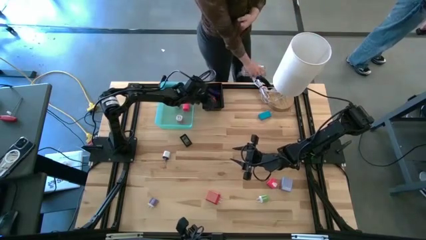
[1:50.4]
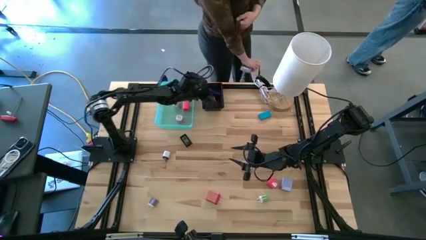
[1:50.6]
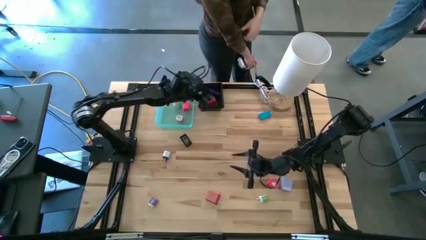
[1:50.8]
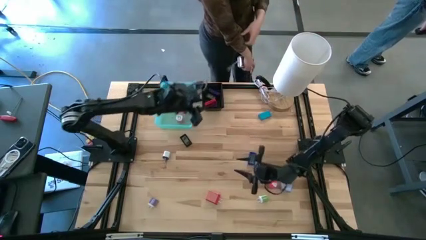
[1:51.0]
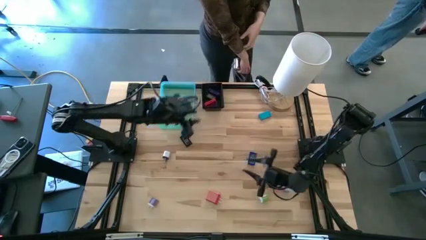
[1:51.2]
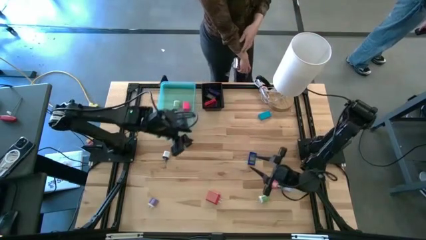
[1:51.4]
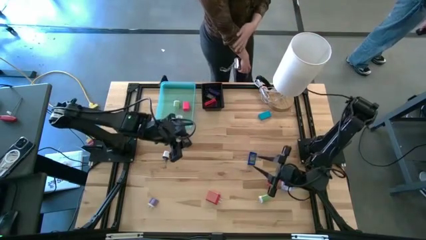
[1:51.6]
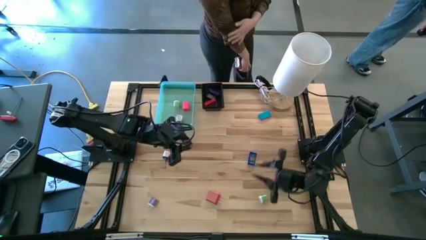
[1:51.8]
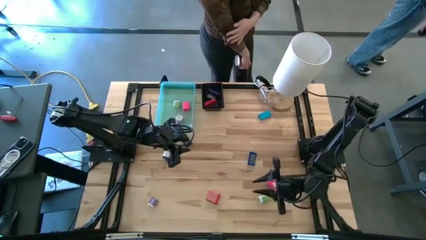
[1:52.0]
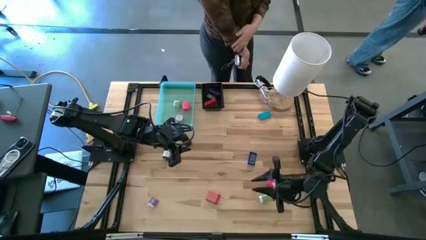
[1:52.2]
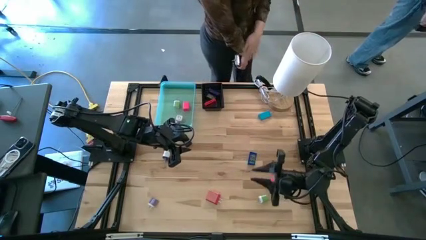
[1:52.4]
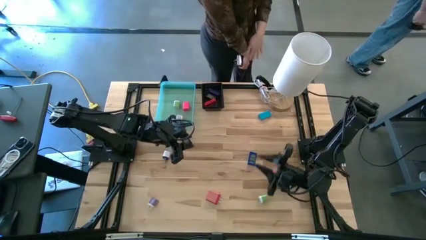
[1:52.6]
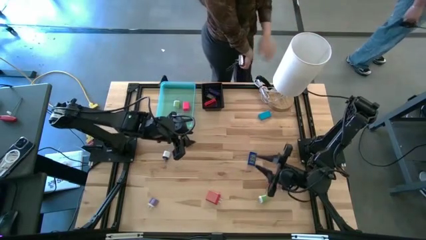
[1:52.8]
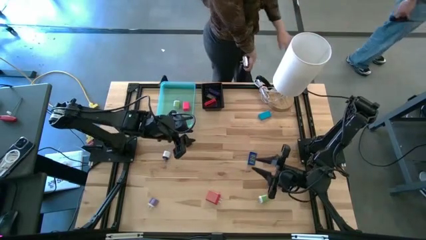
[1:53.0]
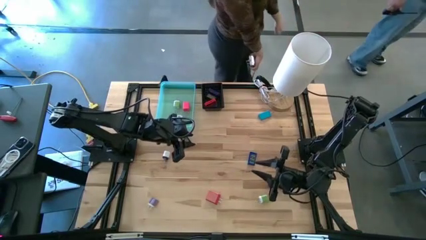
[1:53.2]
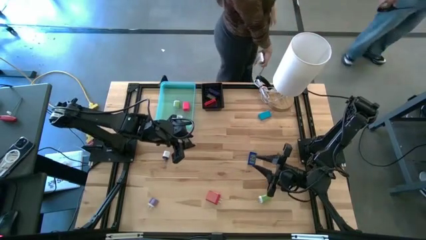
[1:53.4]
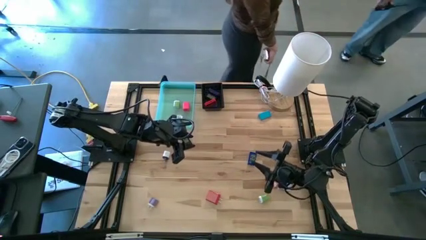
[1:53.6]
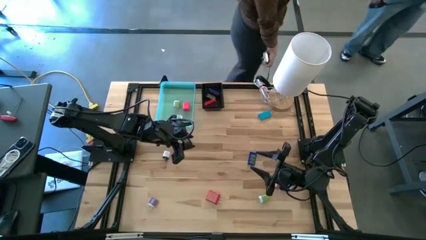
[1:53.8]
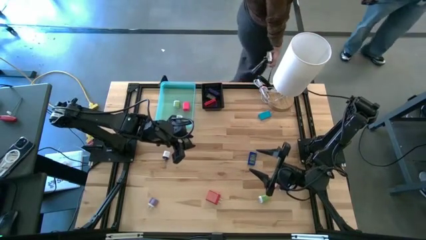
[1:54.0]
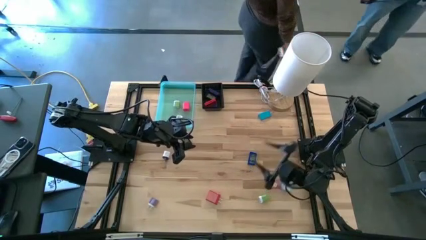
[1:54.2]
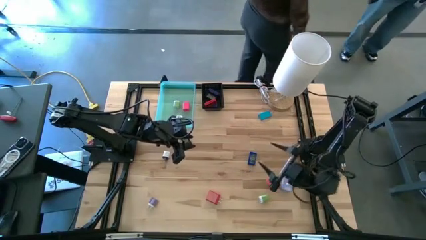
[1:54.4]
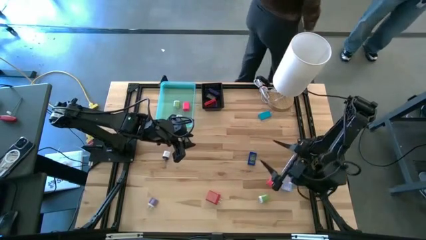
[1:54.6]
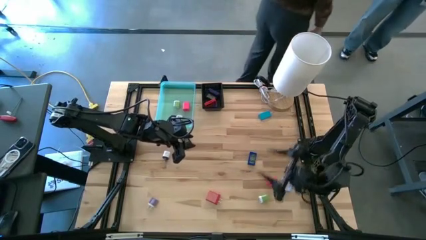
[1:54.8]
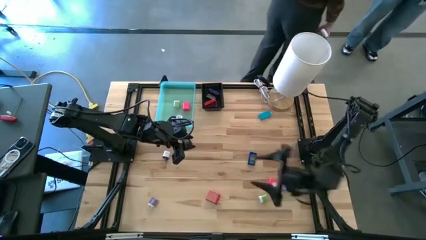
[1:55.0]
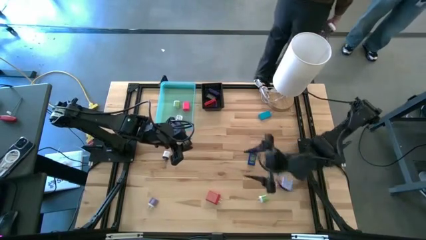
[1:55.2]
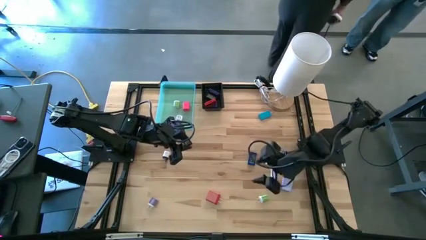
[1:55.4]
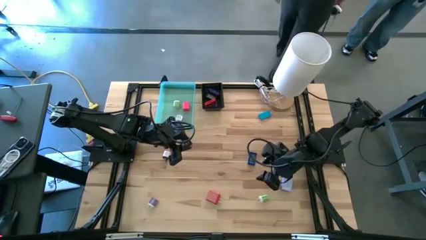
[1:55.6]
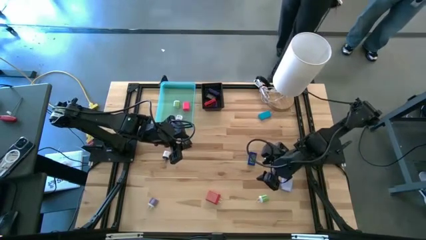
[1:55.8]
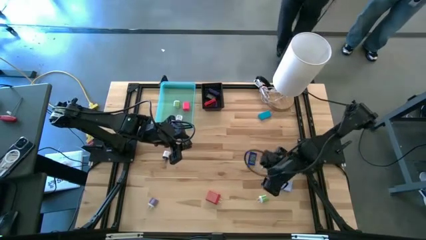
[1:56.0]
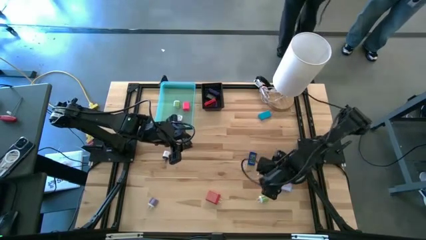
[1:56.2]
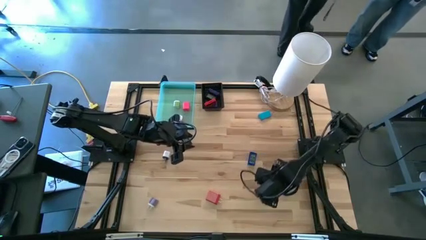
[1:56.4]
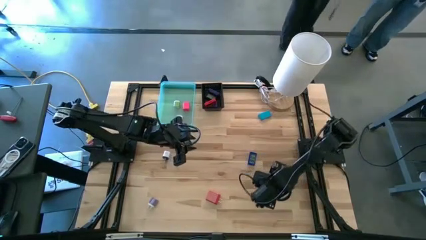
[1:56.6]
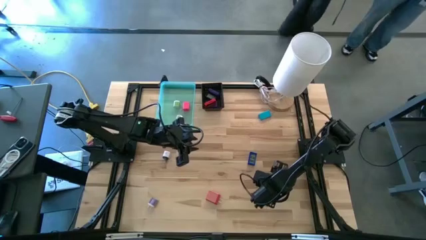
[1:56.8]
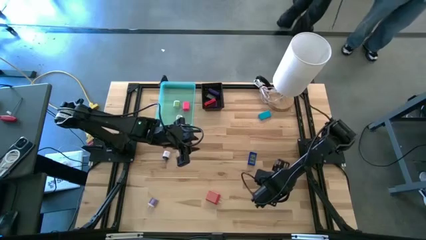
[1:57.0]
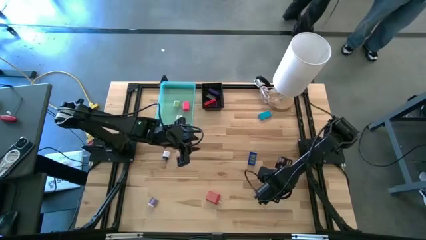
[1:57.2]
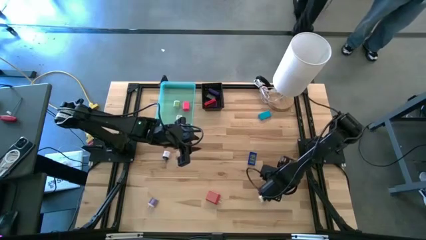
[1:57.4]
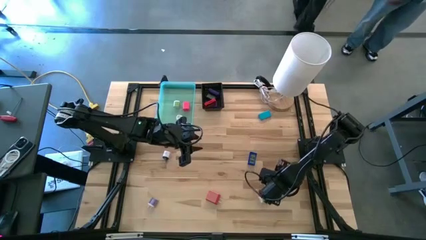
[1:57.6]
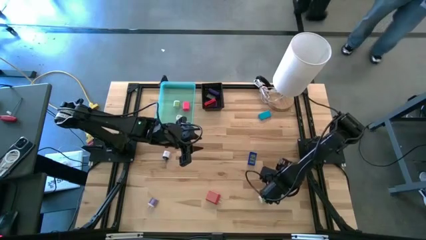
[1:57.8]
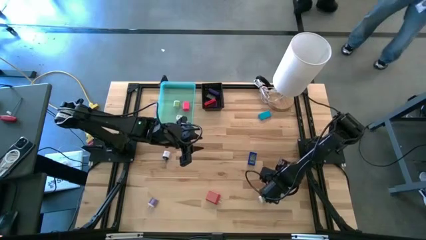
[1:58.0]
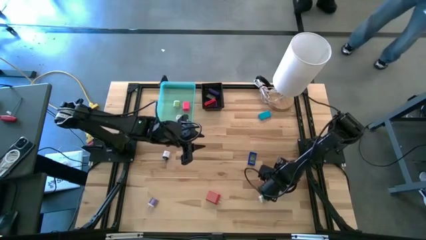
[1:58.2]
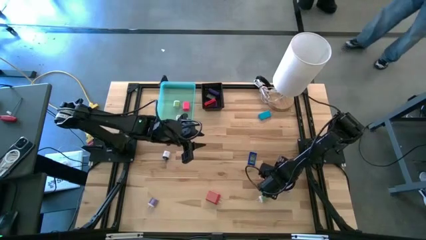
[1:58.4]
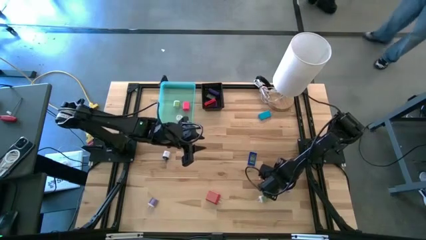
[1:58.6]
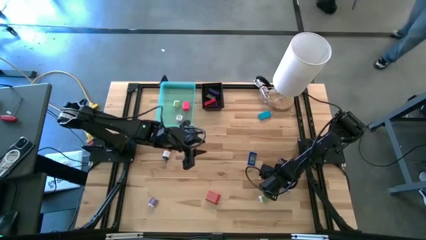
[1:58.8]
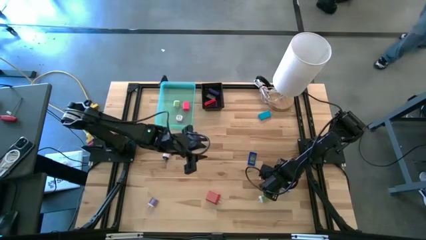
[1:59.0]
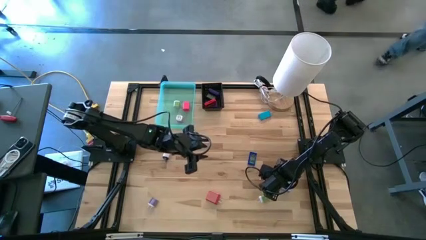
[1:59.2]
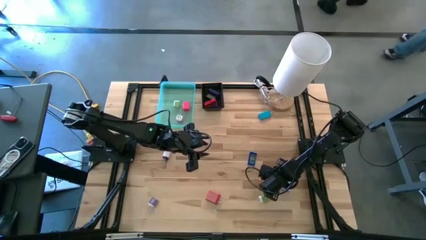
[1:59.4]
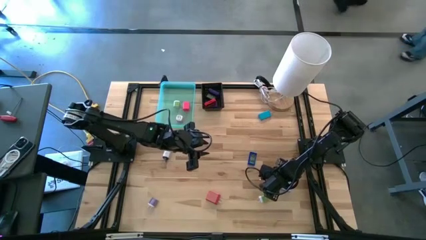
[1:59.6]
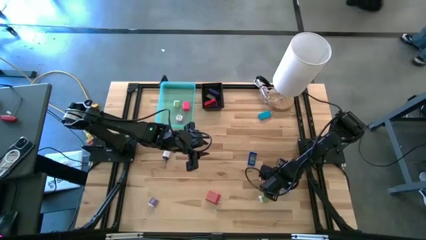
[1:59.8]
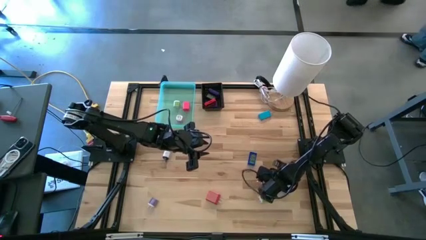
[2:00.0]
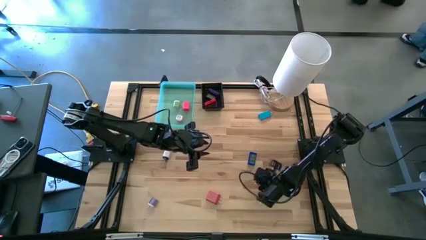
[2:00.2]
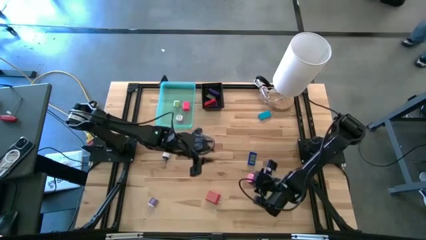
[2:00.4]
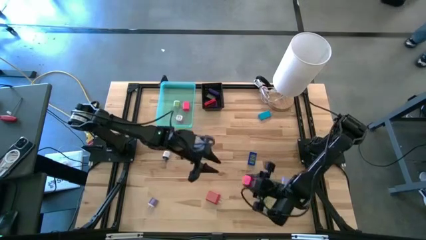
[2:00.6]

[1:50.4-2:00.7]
Task: Pick & Place Office items
Put the pink charger adapter into the green bin

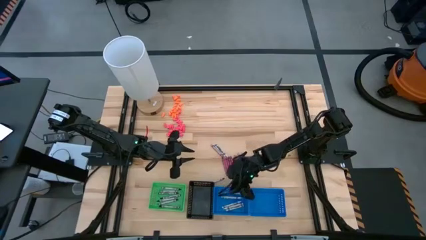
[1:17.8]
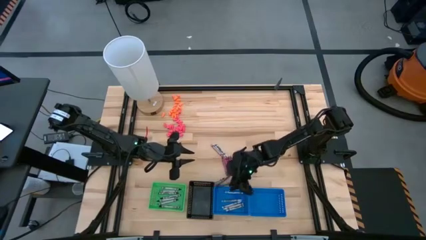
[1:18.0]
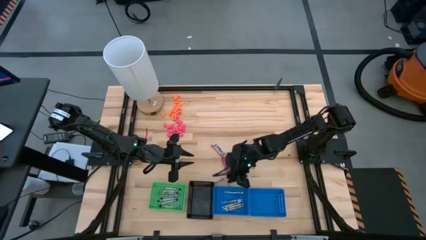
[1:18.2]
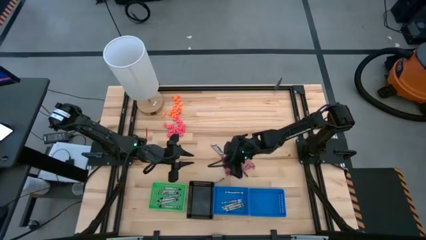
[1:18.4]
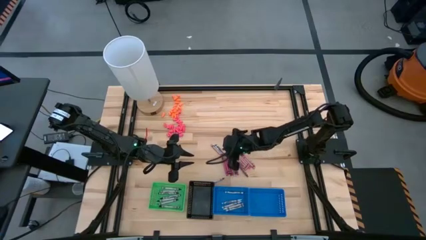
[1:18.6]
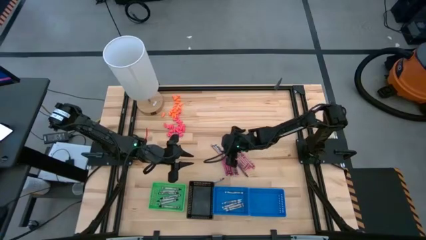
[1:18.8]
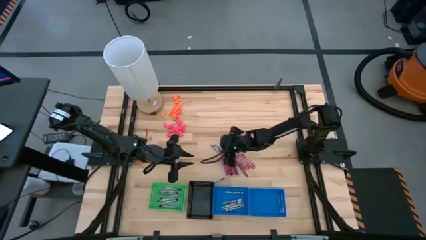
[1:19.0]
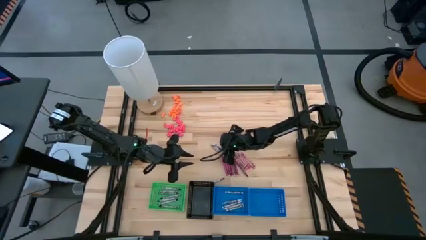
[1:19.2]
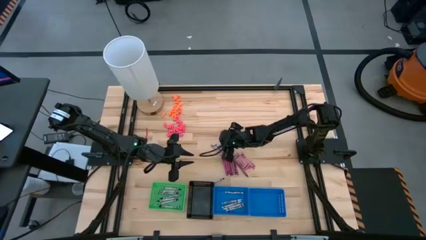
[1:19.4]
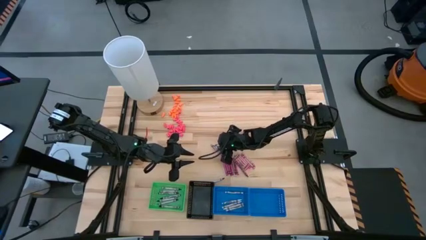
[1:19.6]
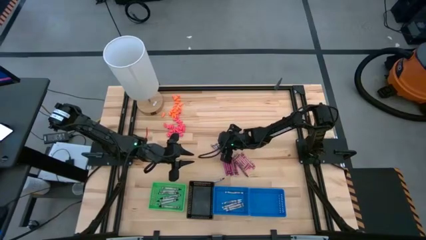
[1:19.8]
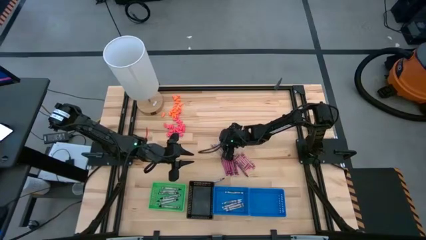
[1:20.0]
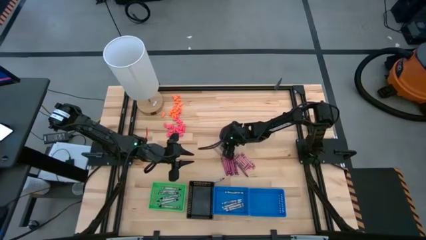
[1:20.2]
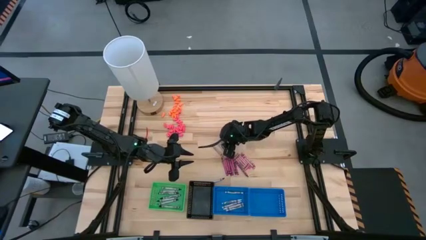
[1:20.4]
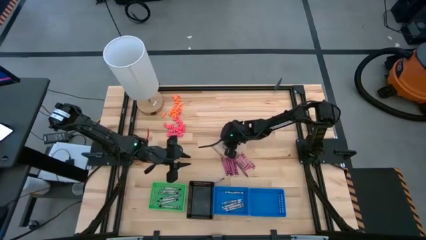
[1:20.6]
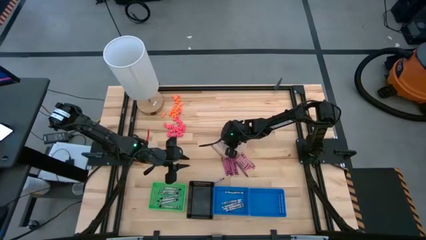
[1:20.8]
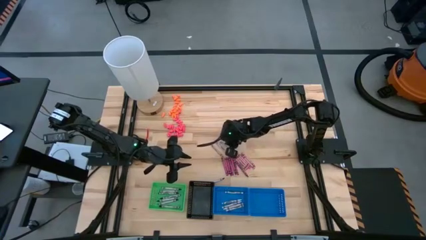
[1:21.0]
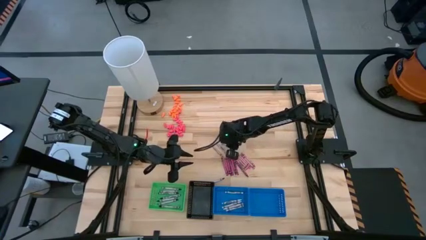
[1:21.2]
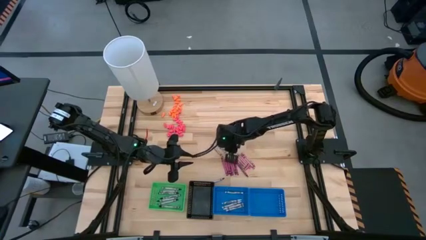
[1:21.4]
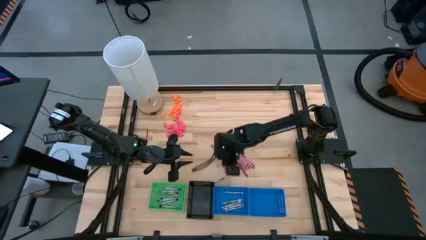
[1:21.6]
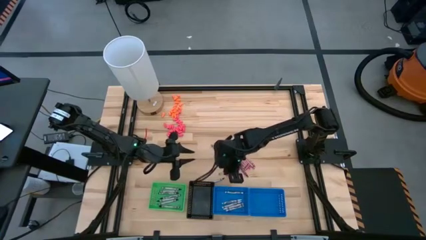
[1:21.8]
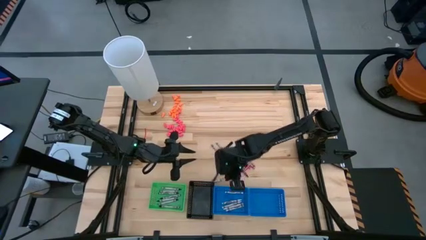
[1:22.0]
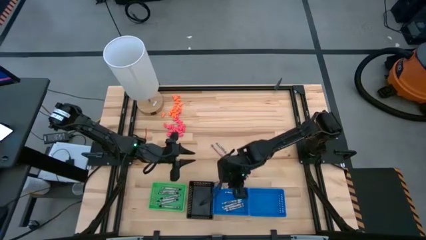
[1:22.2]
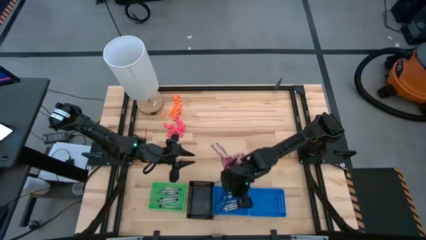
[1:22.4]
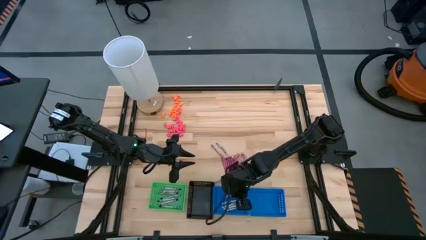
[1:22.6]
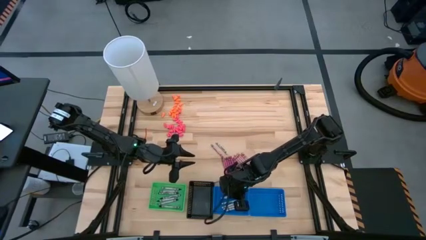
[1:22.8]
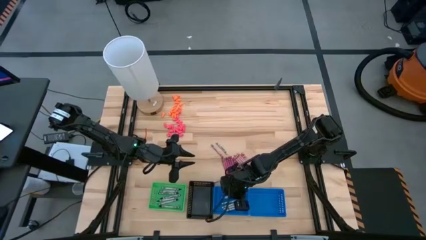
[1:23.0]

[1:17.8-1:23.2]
Task: Sort crayons
Put the white crayon into the left blue bin
